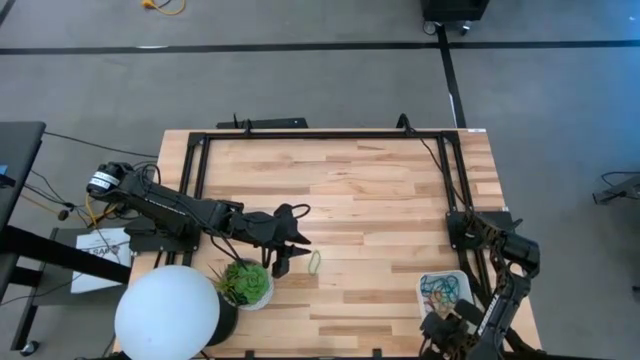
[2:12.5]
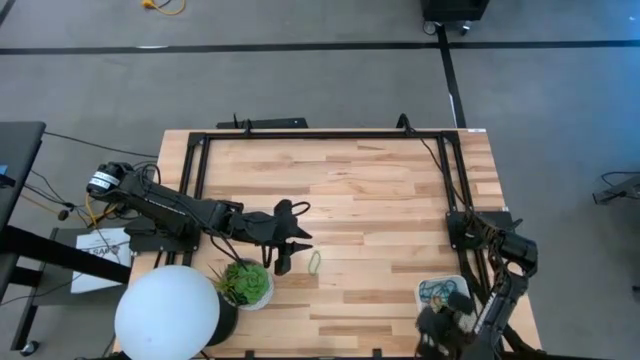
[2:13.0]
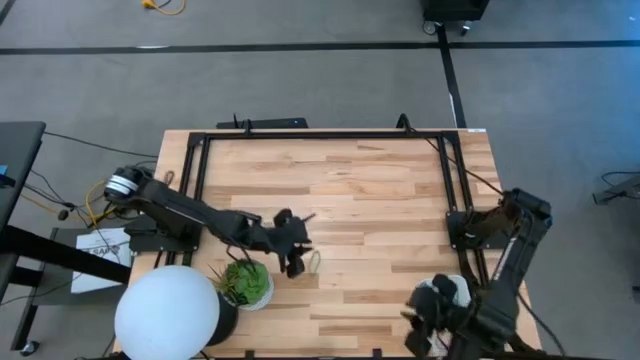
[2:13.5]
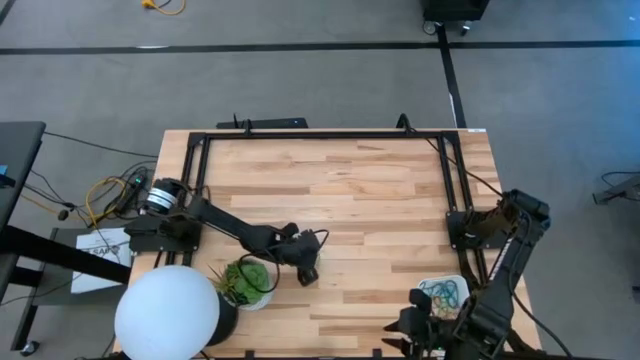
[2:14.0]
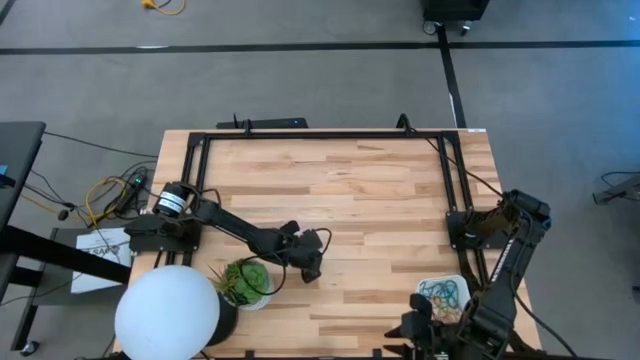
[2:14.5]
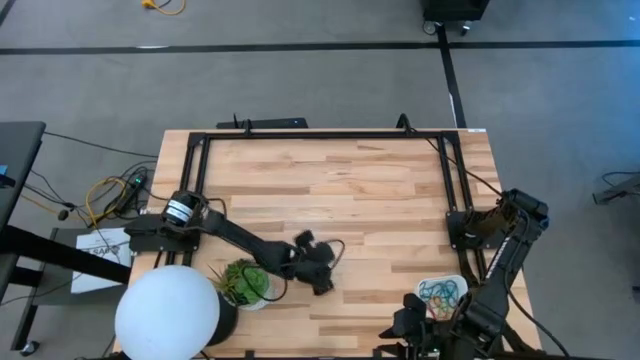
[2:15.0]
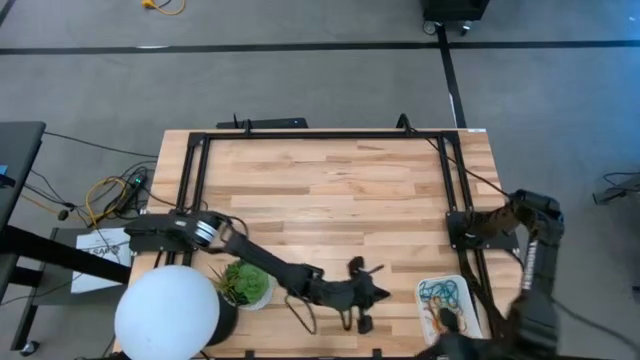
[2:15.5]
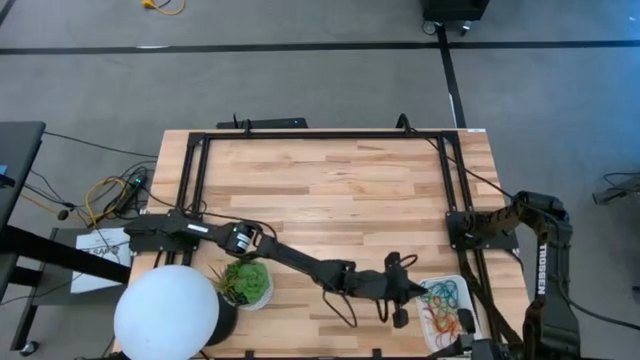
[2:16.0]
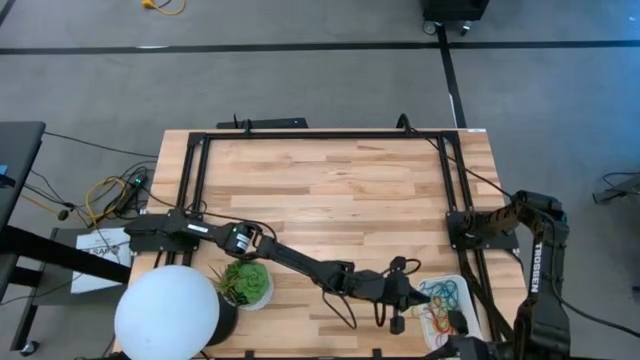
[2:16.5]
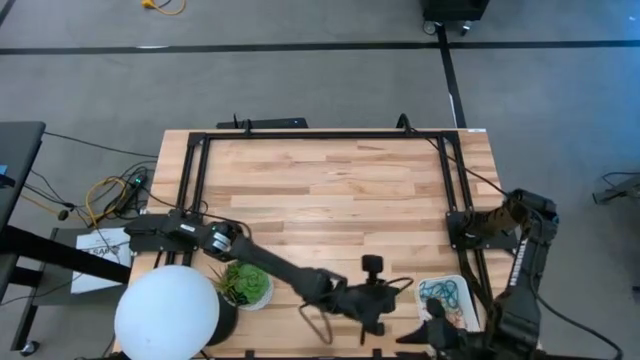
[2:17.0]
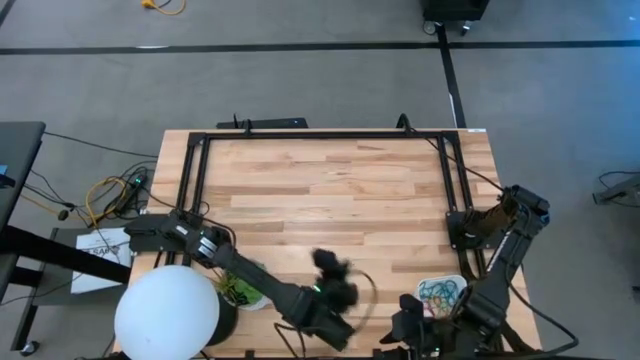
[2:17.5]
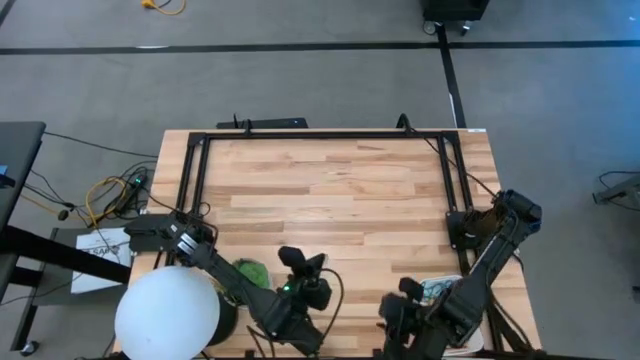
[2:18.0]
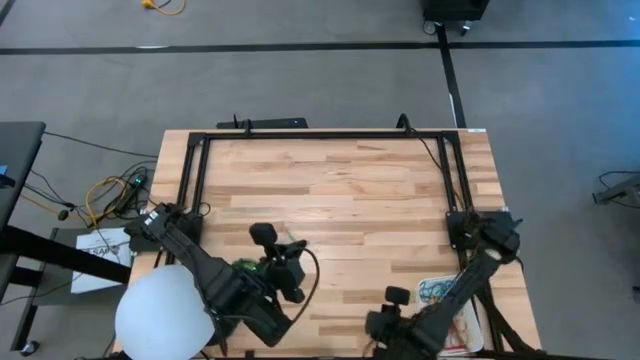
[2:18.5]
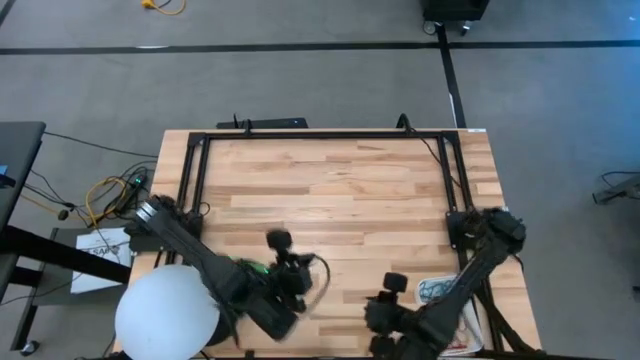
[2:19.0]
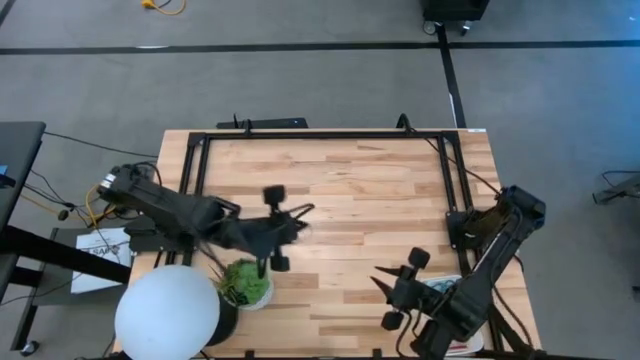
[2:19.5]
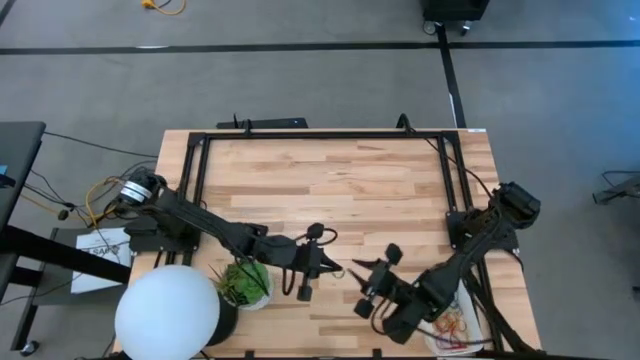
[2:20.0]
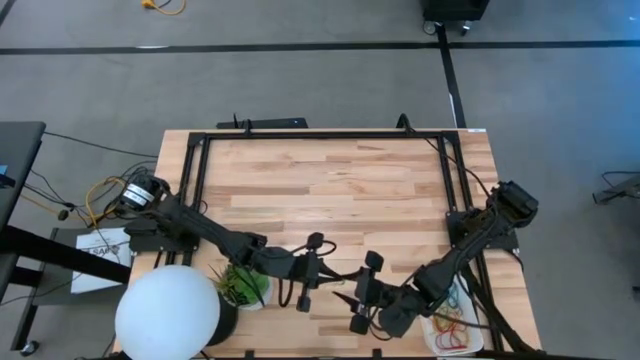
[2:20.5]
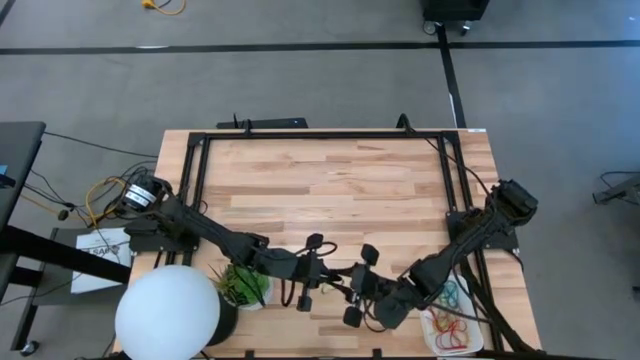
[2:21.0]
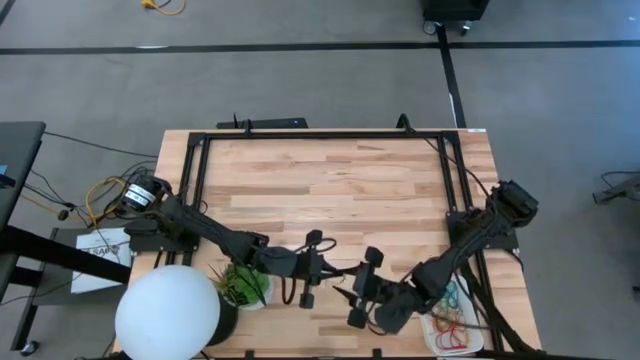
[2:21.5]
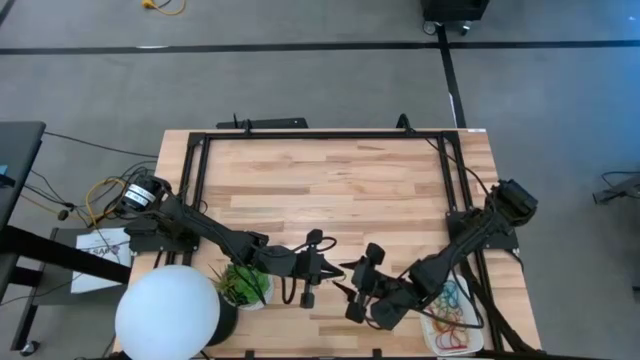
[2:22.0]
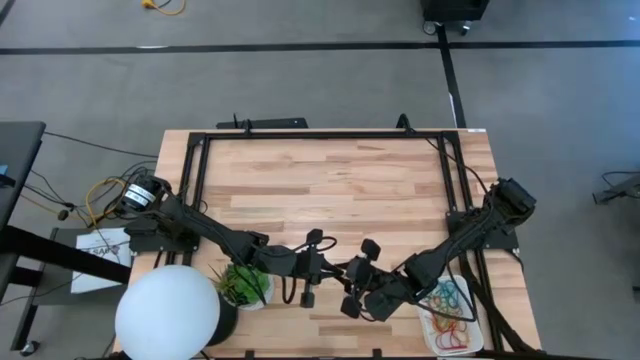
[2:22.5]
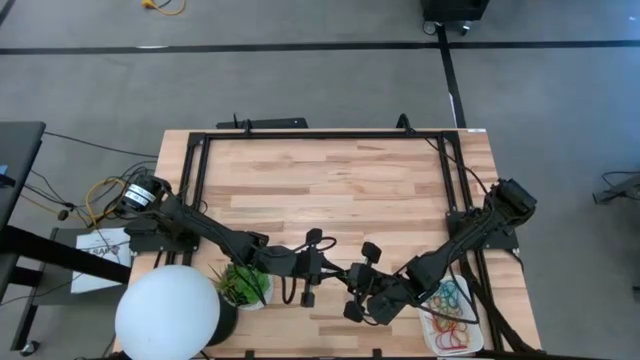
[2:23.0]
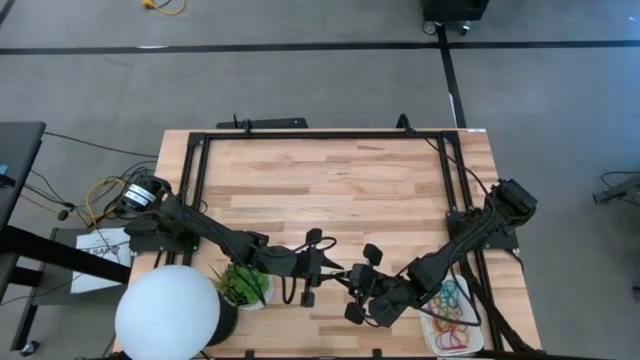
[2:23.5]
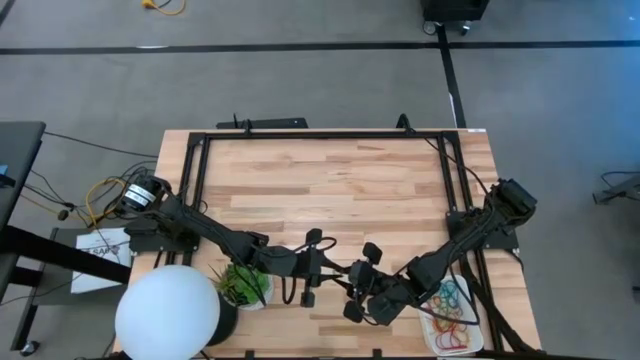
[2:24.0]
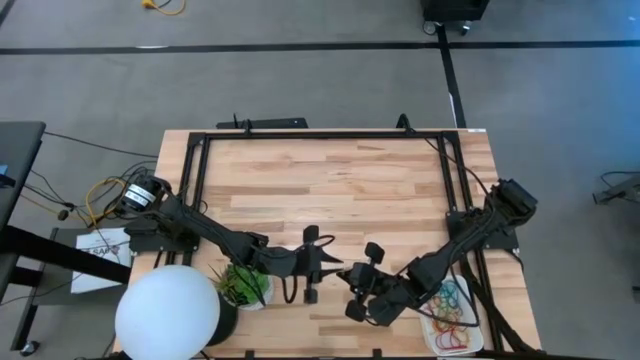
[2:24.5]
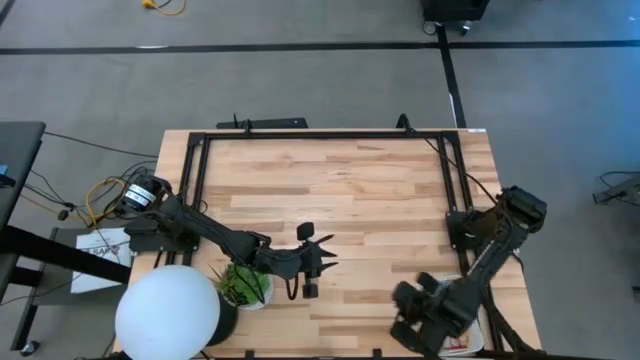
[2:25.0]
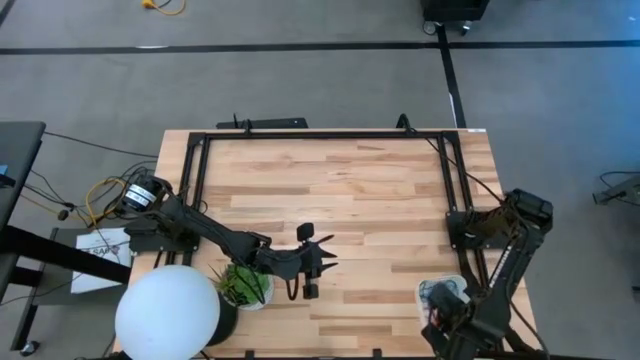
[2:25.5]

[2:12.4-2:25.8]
Task: Pick and place items into bin
Put the green rubber band into the white bin

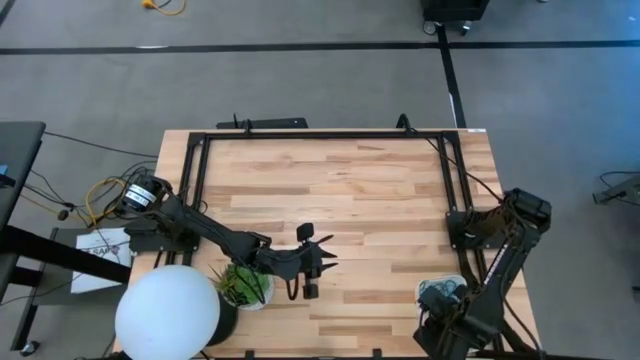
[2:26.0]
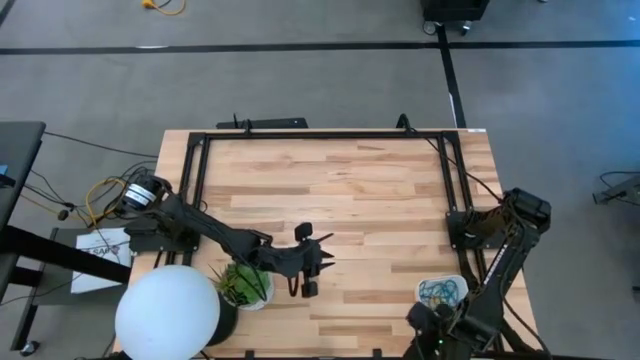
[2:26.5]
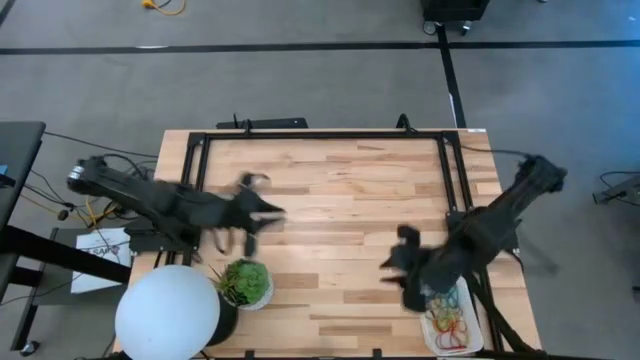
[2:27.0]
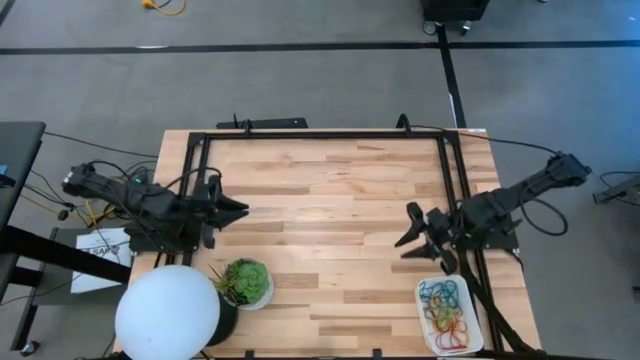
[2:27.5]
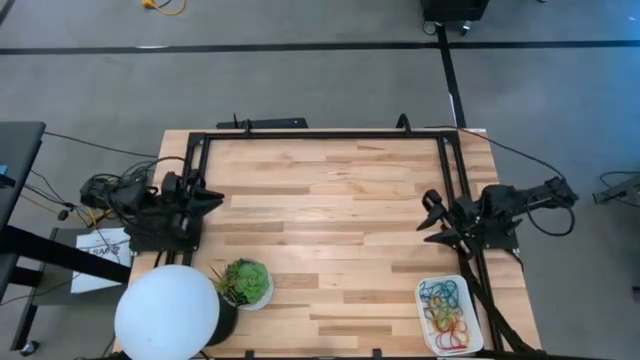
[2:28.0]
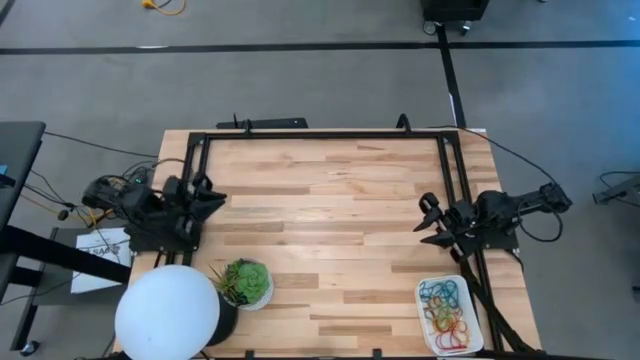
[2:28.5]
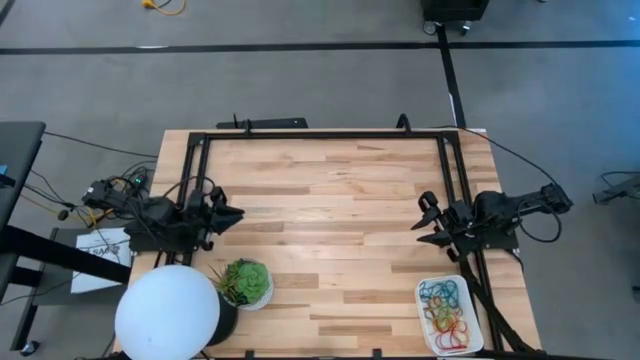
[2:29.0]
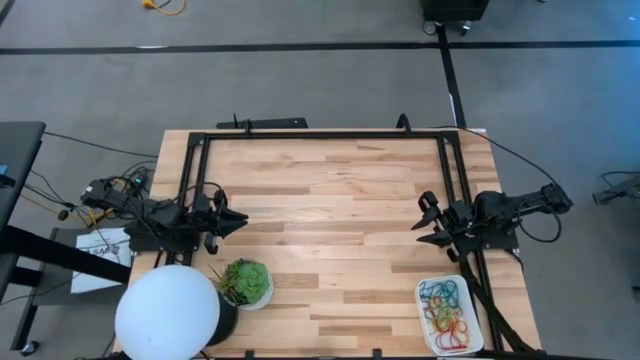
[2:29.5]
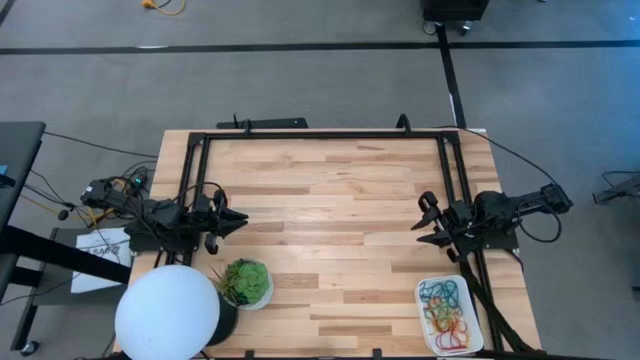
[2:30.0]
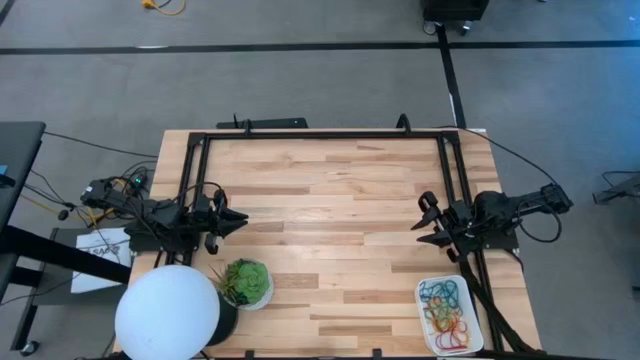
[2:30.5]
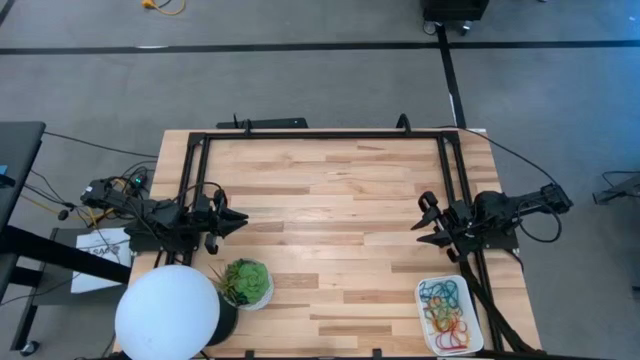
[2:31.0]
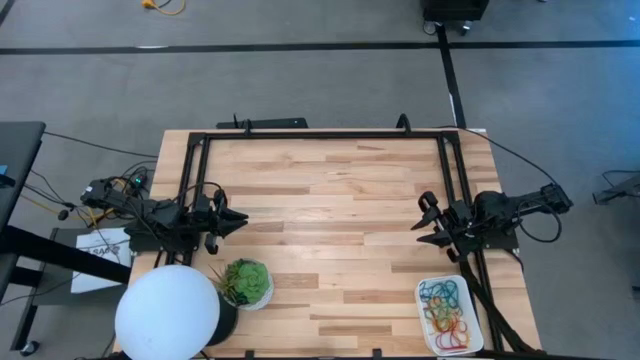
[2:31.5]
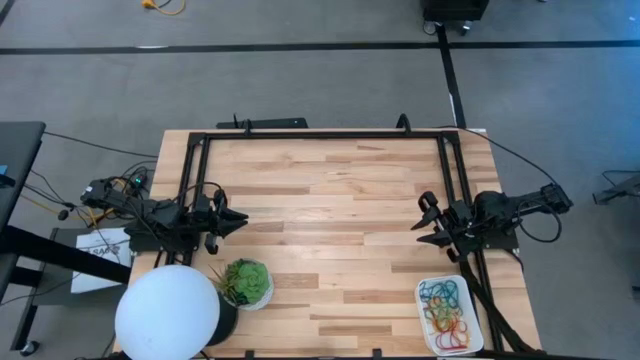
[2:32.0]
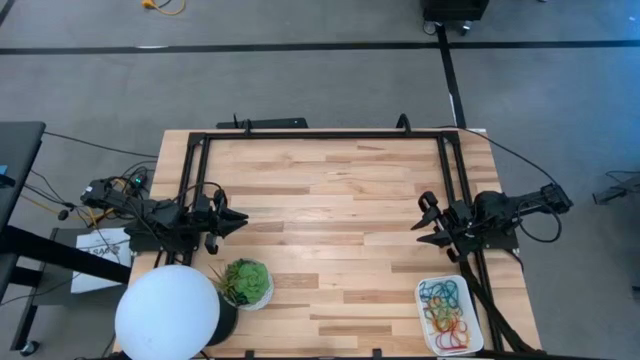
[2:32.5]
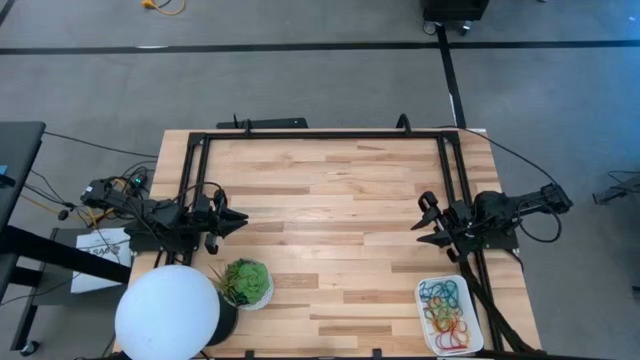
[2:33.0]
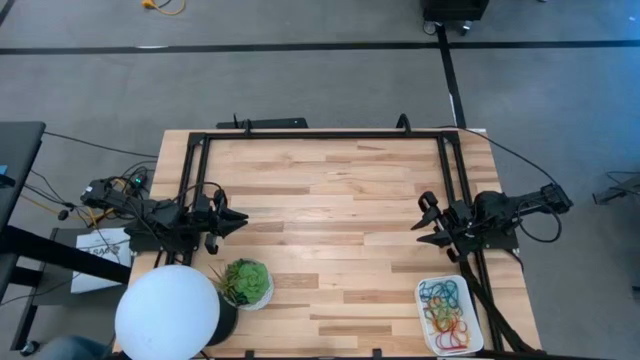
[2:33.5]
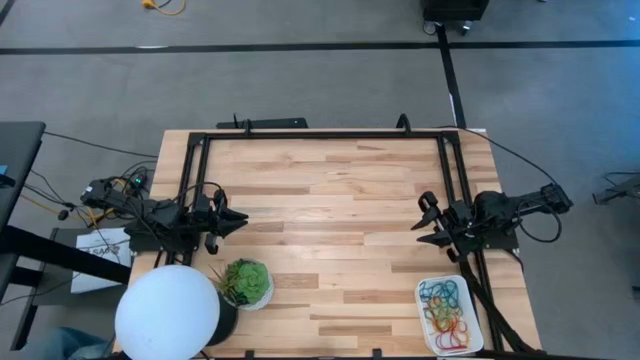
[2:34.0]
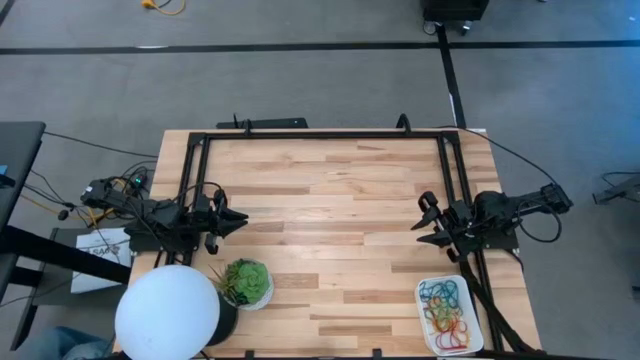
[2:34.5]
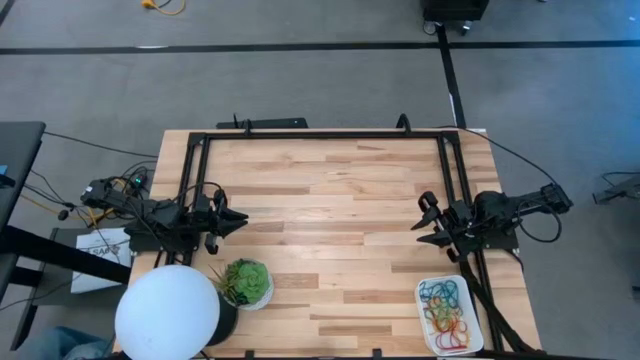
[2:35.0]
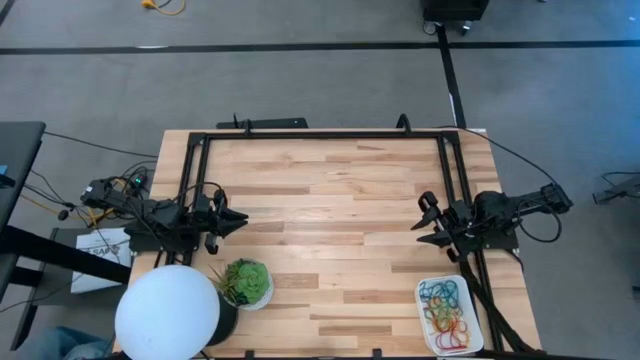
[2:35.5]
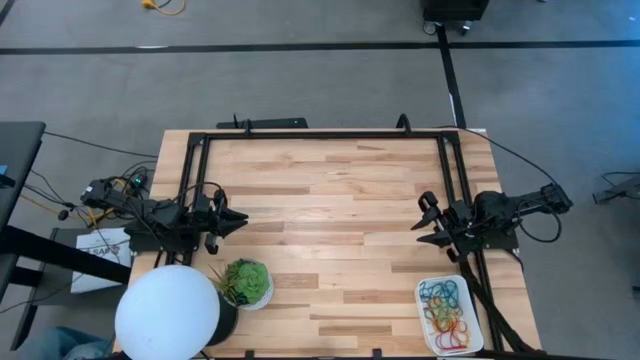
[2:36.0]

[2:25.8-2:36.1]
Return to Home Position
